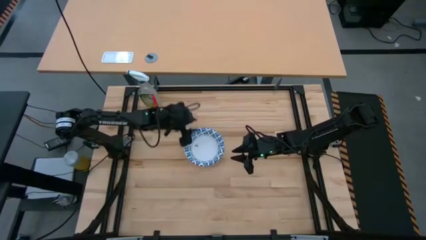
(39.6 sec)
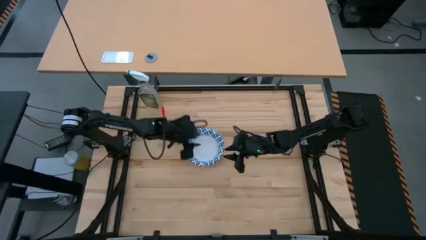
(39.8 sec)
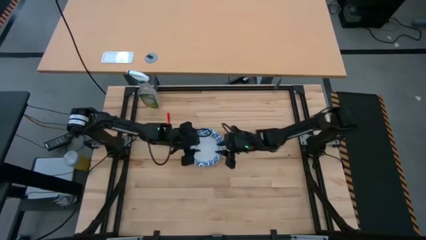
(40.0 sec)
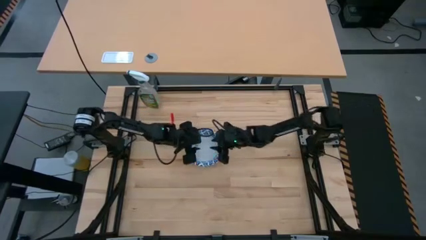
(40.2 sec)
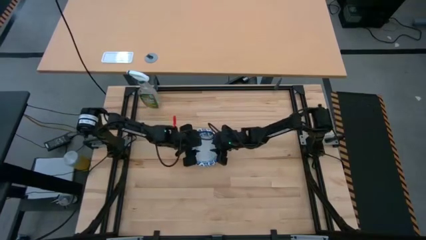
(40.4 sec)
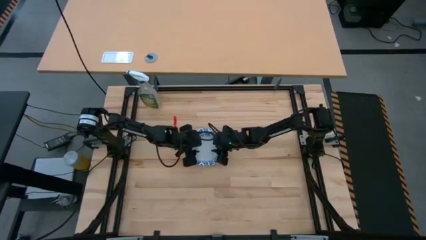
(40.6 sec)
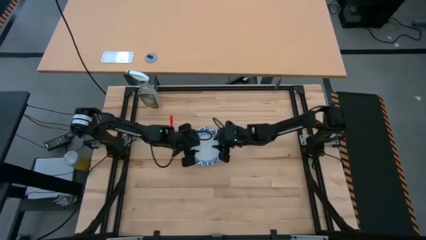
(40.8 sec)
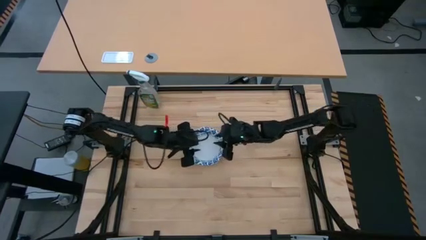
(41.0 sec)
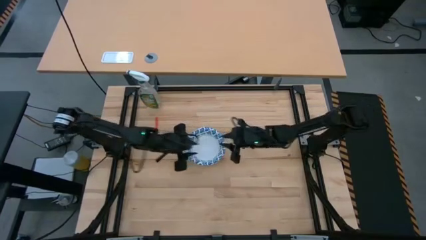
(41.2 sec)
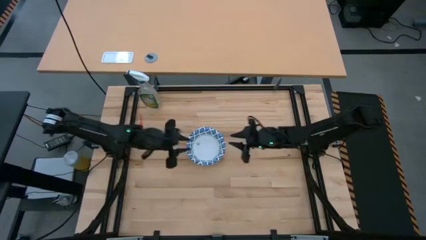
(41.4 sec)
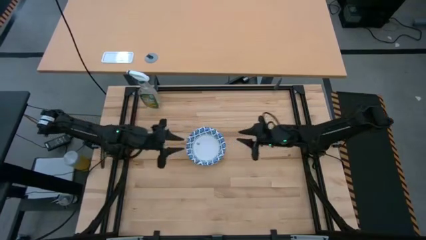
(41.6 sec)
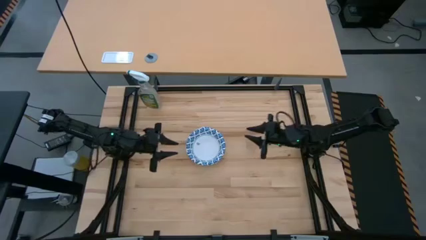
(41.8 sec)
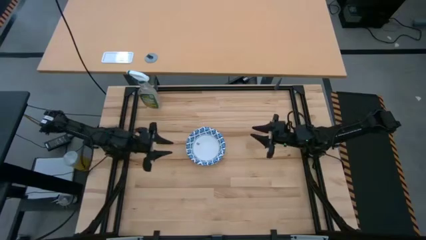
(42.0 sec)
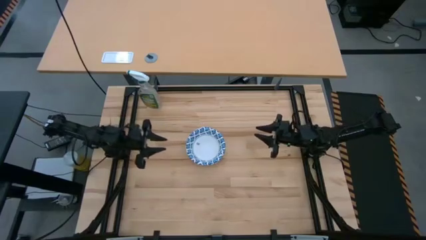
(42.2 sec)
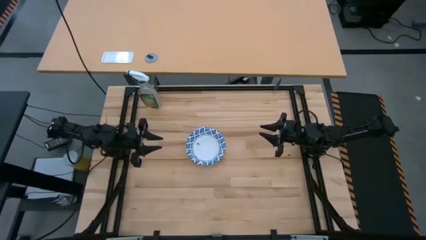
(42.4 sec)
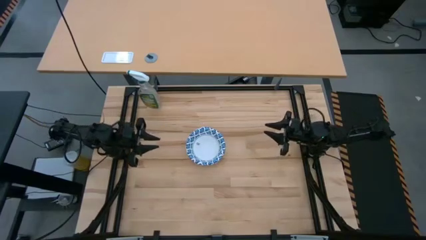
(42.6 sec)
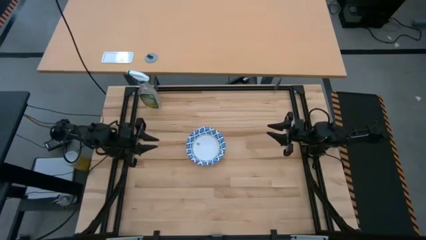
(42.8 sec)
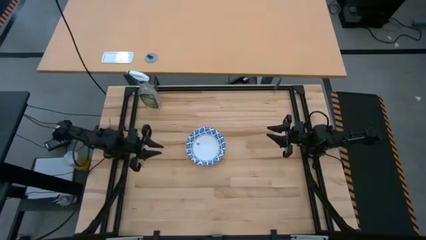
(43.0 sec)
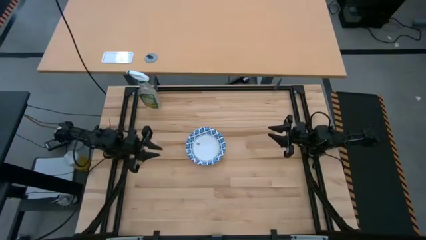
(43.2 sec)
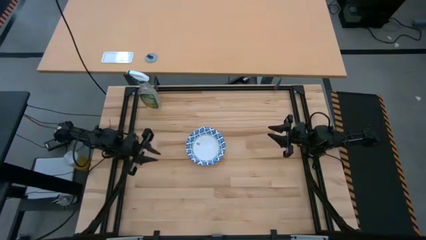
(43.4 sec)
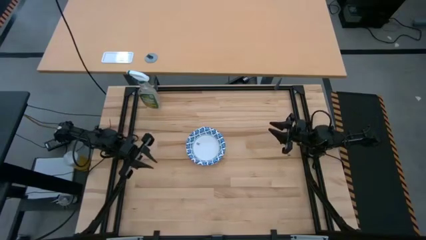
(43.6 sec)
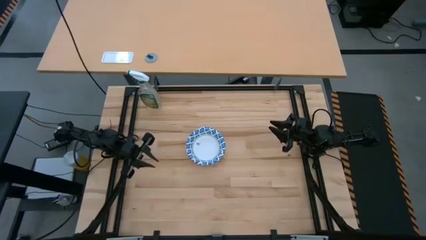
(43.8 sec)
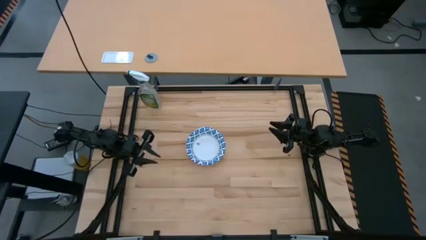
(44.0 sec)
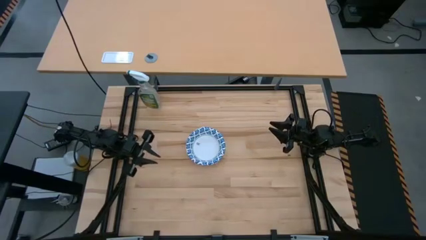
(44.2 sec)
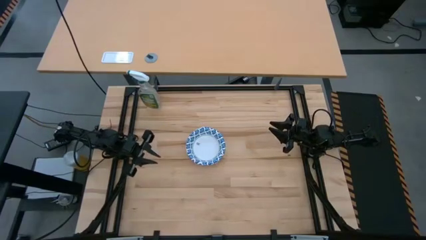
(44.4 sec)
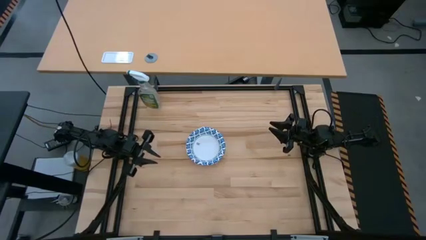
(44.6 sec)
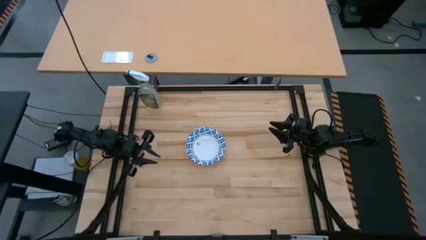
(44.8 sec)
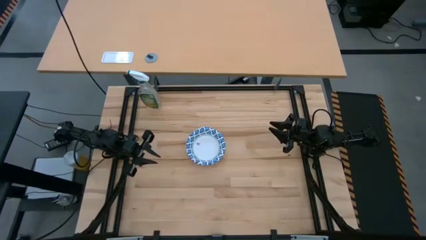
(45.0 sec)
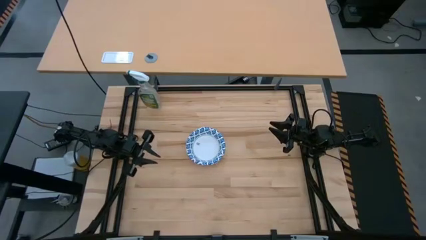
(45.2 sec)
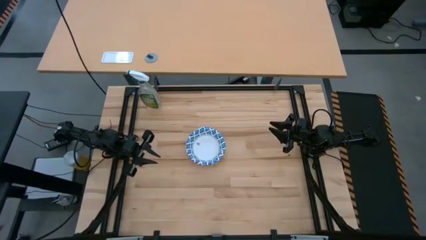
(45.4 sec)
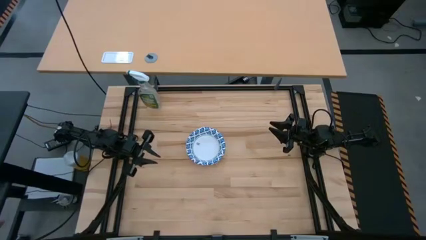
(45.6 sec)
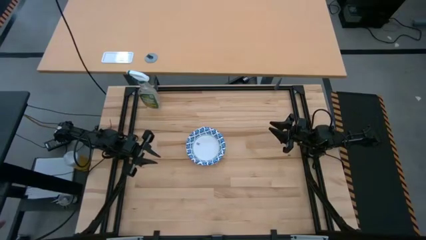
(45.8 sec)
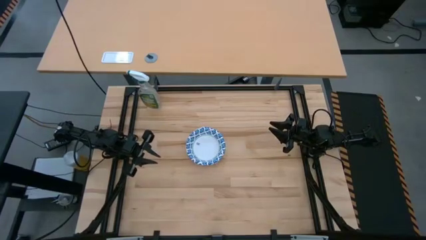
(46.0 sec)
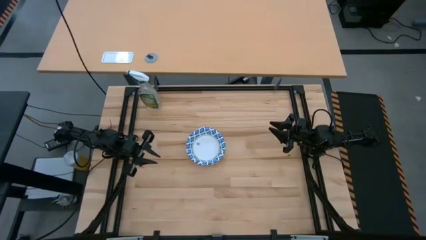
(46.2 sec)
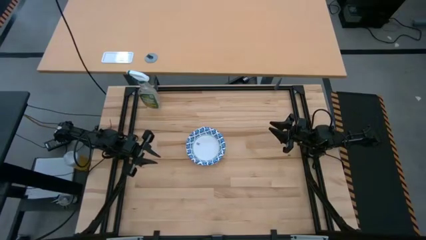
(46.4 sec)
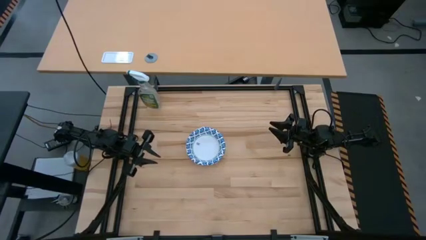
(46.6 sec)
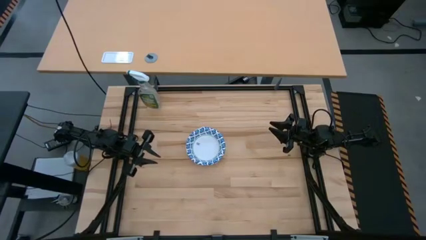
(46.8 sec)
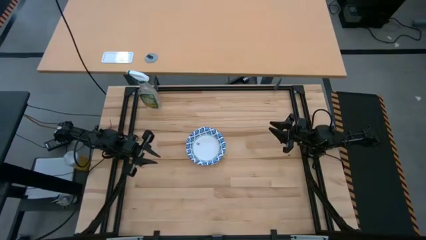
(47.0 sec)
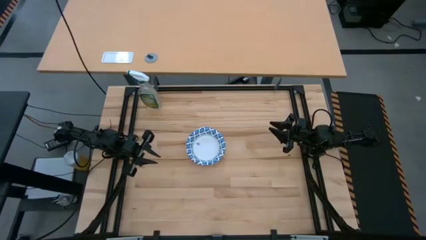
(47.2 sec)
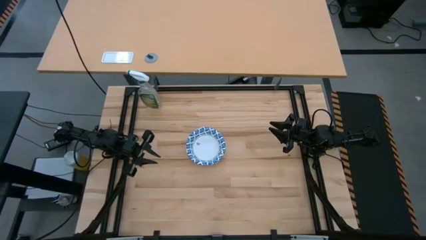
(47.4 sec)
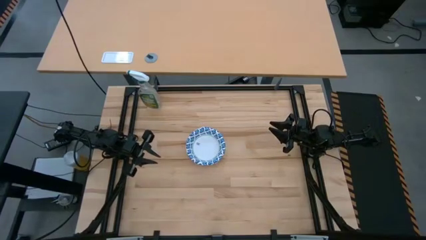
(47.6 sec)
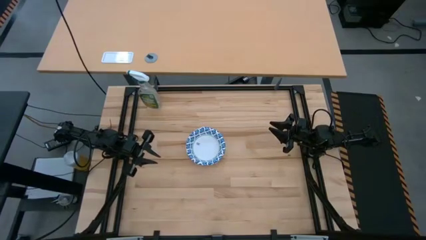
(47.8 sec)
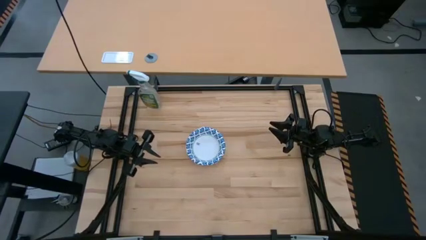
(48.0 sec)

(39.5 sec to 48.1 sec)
Return to Home Position
